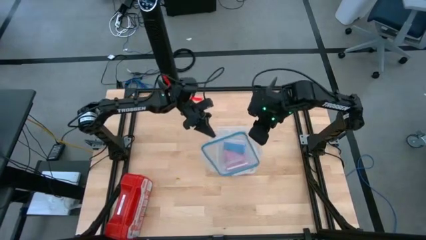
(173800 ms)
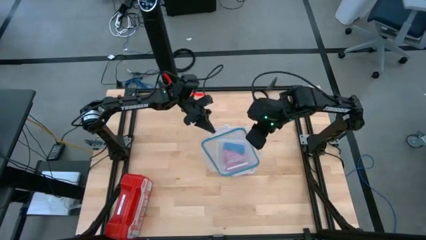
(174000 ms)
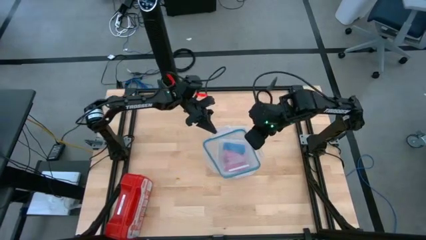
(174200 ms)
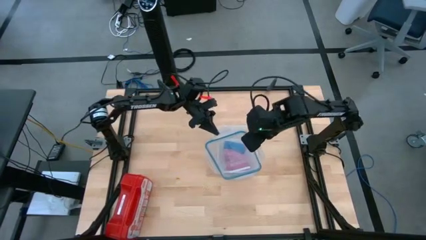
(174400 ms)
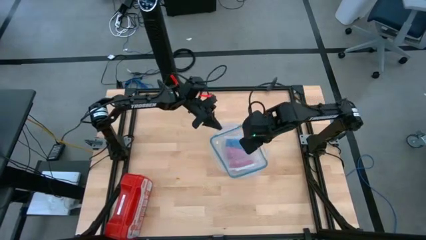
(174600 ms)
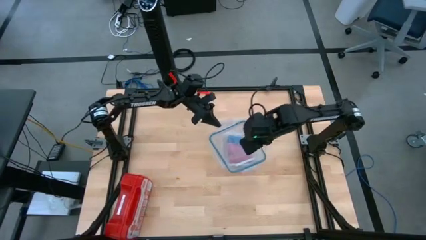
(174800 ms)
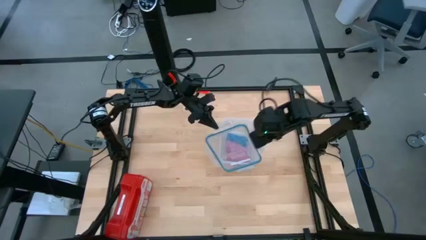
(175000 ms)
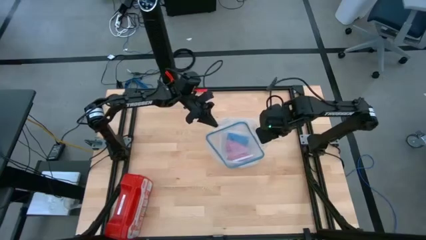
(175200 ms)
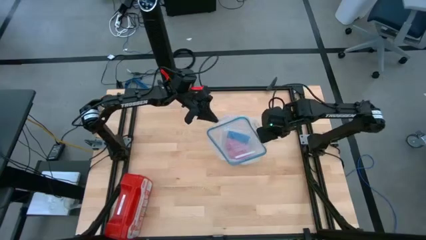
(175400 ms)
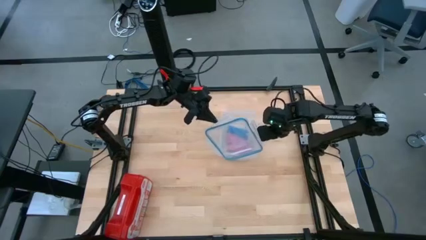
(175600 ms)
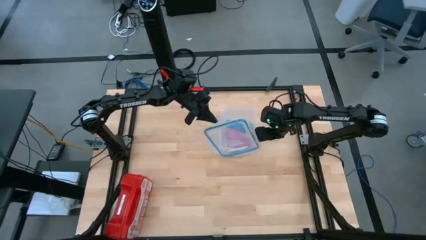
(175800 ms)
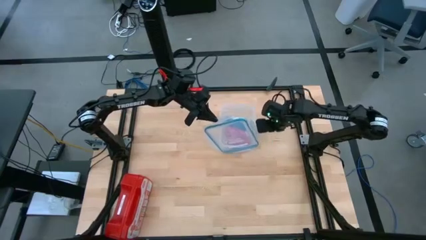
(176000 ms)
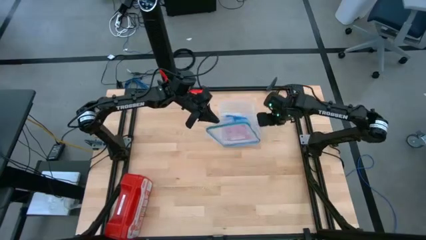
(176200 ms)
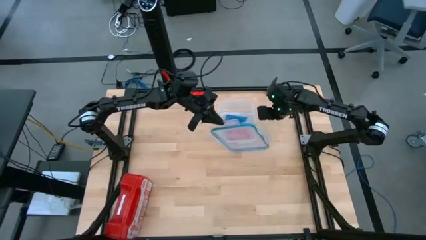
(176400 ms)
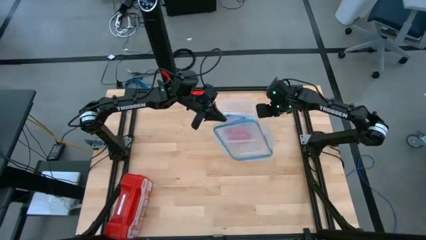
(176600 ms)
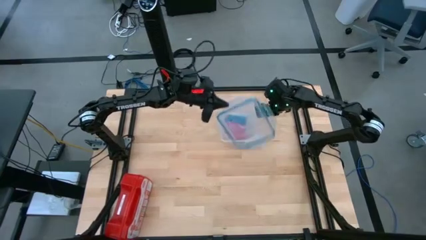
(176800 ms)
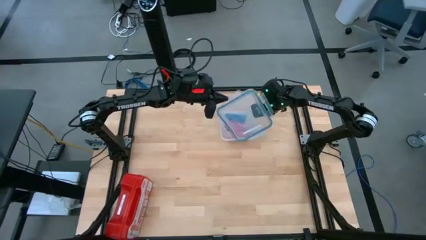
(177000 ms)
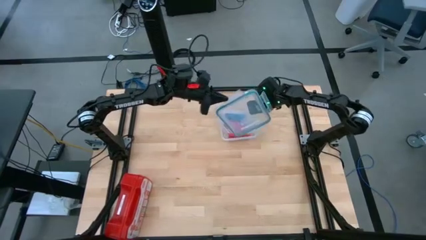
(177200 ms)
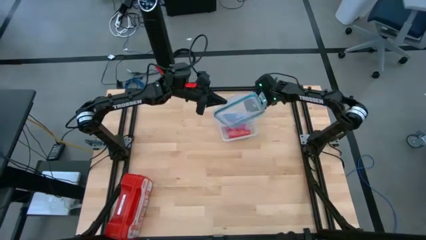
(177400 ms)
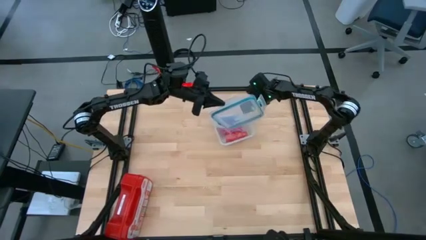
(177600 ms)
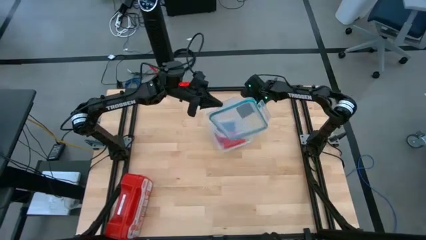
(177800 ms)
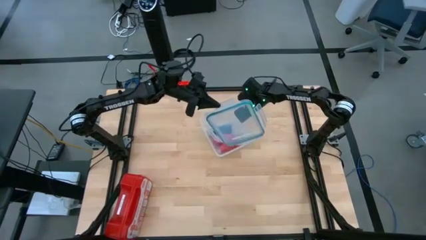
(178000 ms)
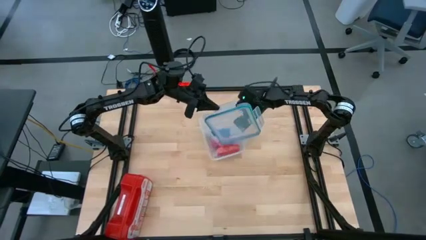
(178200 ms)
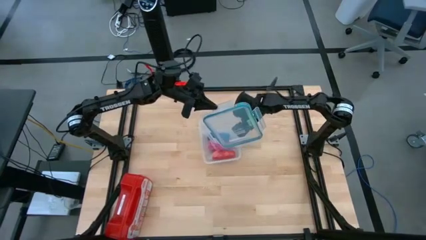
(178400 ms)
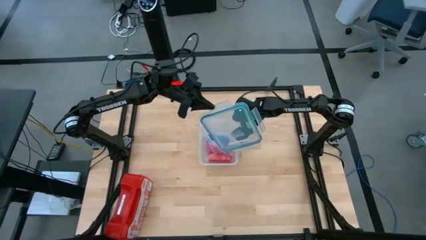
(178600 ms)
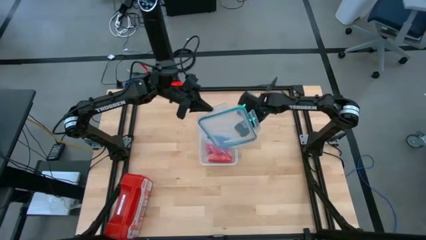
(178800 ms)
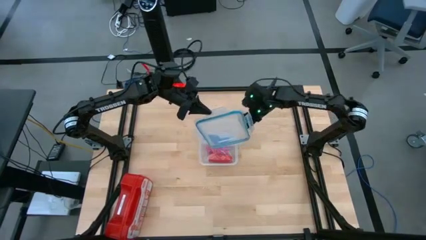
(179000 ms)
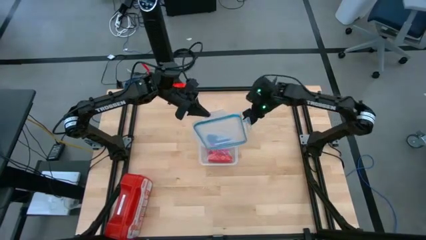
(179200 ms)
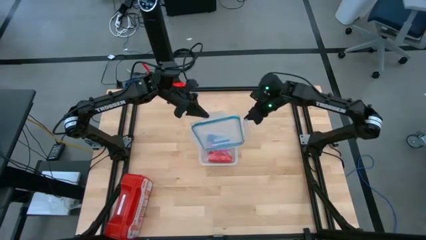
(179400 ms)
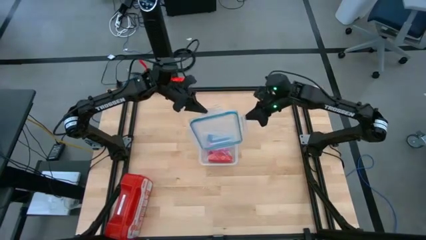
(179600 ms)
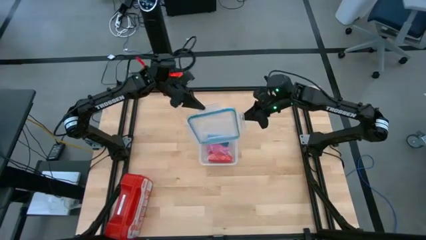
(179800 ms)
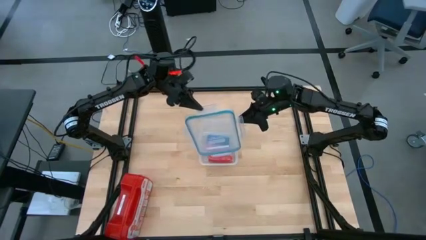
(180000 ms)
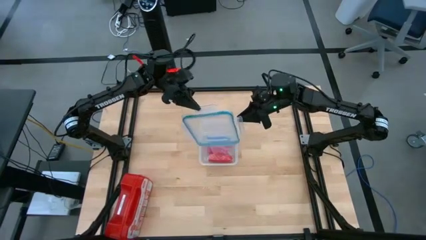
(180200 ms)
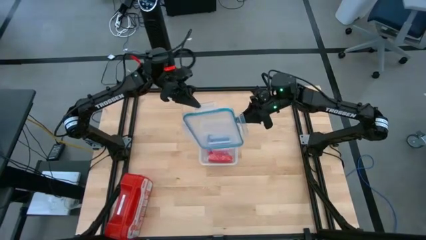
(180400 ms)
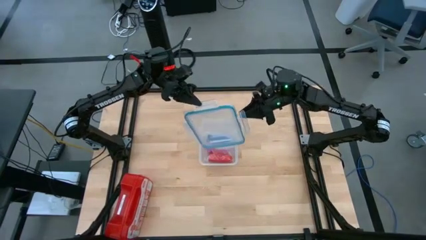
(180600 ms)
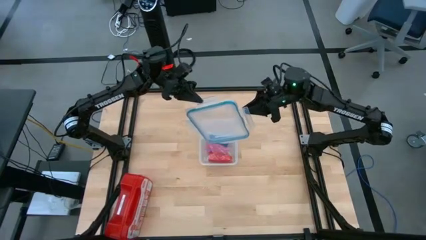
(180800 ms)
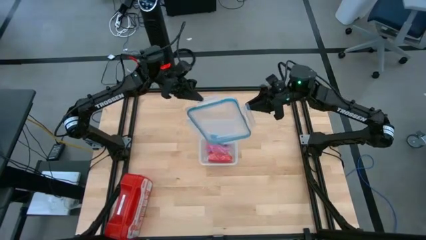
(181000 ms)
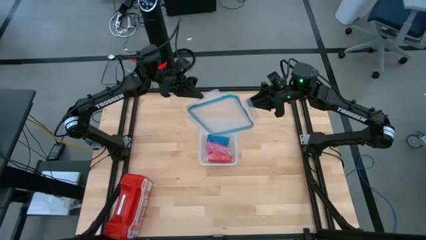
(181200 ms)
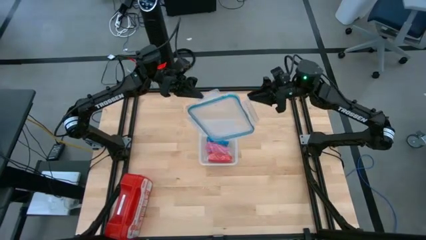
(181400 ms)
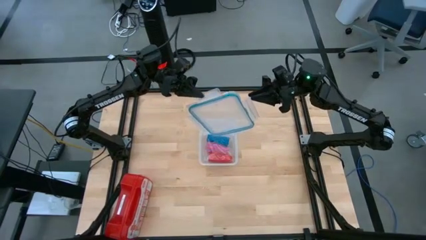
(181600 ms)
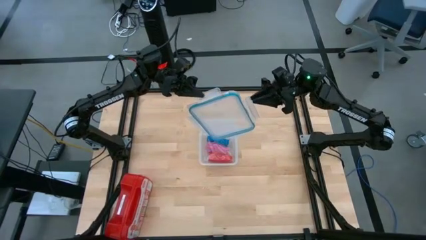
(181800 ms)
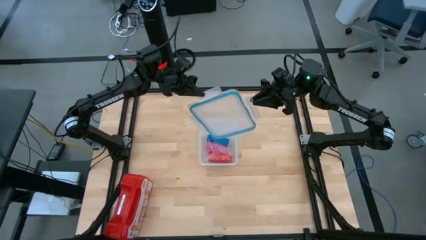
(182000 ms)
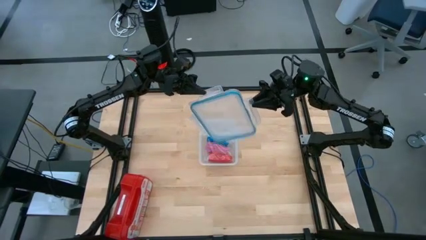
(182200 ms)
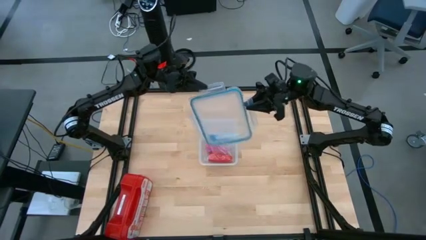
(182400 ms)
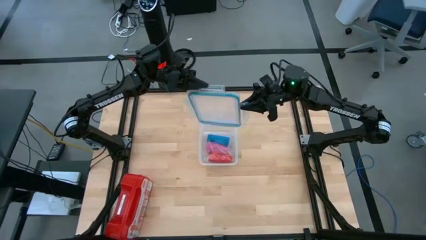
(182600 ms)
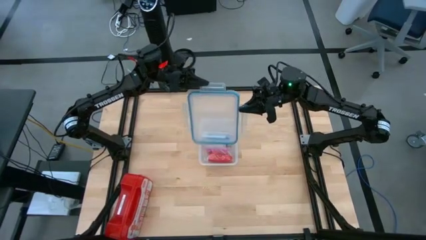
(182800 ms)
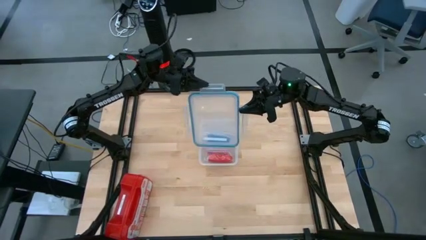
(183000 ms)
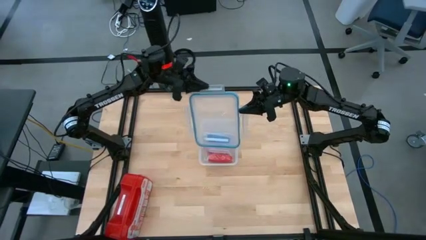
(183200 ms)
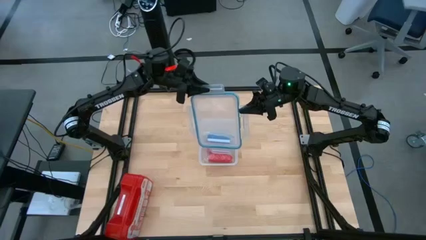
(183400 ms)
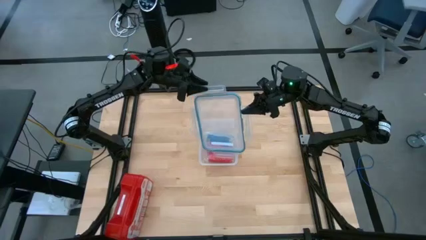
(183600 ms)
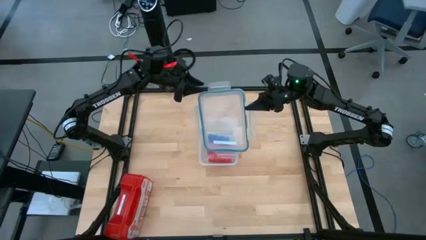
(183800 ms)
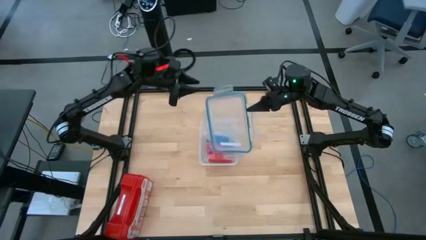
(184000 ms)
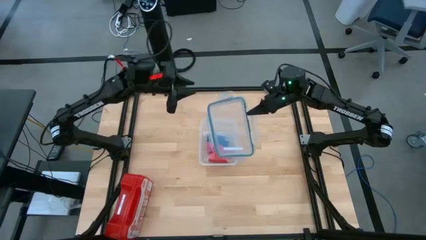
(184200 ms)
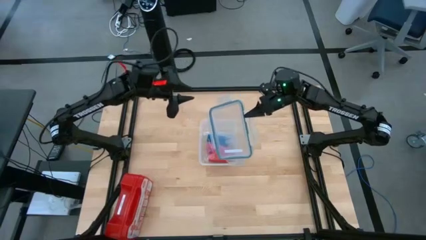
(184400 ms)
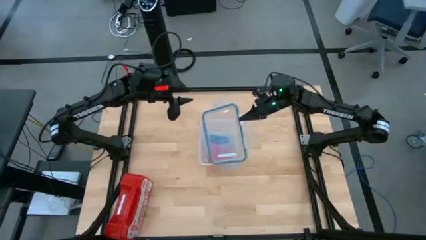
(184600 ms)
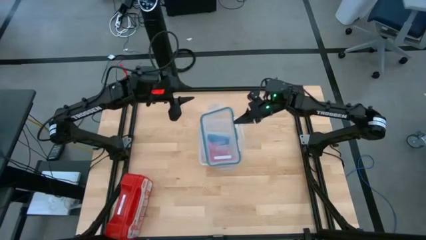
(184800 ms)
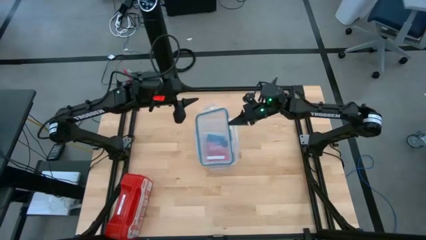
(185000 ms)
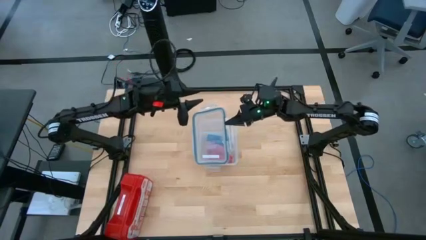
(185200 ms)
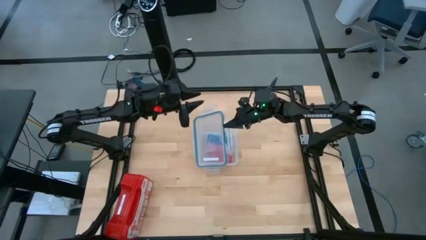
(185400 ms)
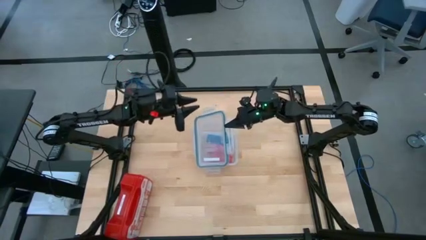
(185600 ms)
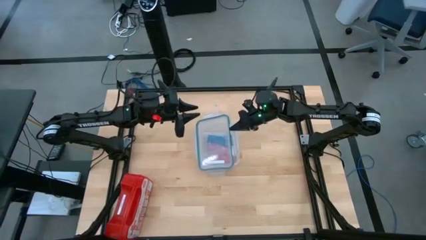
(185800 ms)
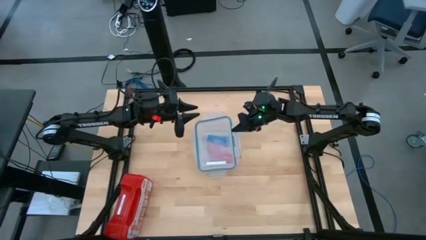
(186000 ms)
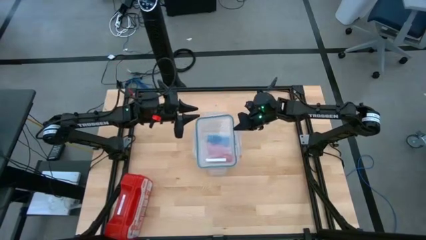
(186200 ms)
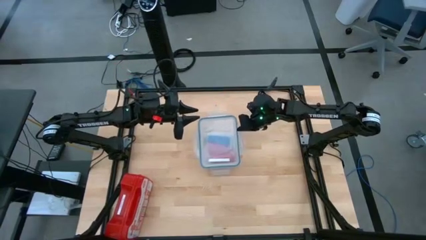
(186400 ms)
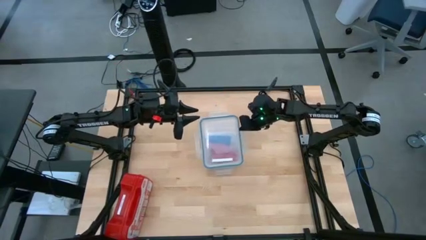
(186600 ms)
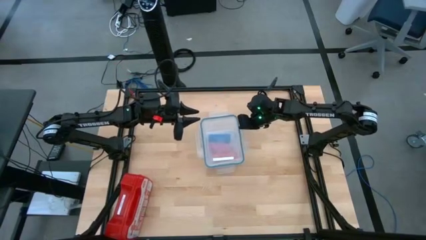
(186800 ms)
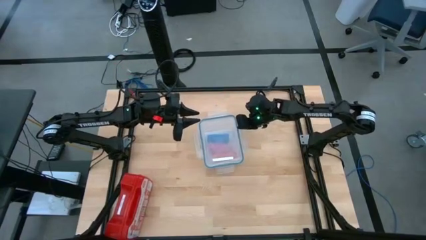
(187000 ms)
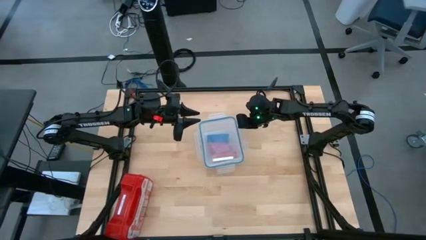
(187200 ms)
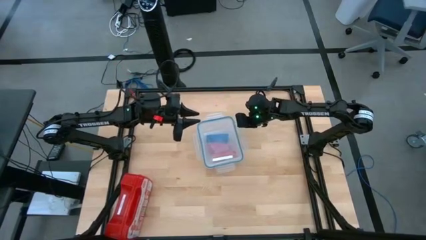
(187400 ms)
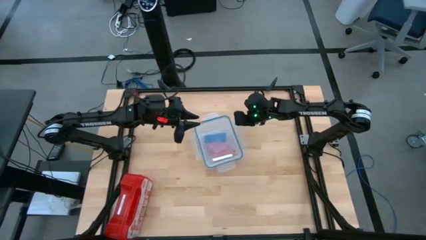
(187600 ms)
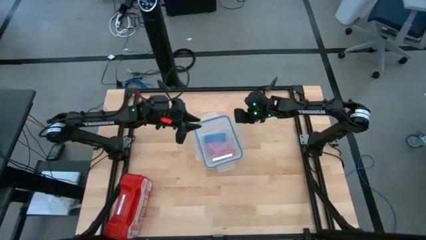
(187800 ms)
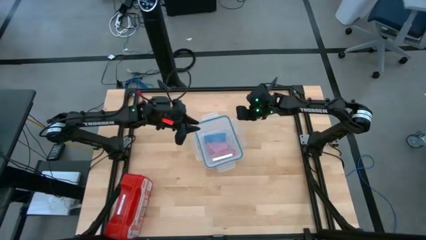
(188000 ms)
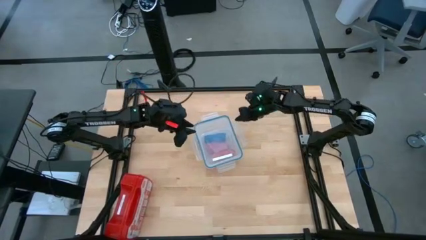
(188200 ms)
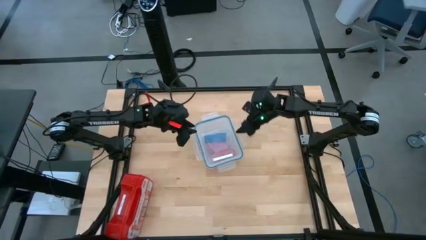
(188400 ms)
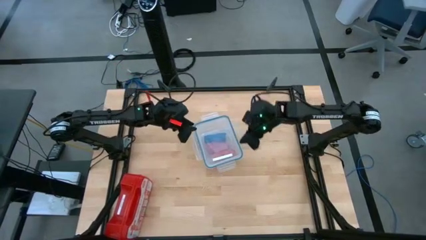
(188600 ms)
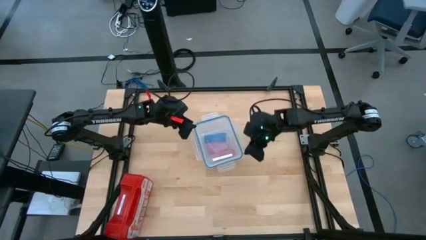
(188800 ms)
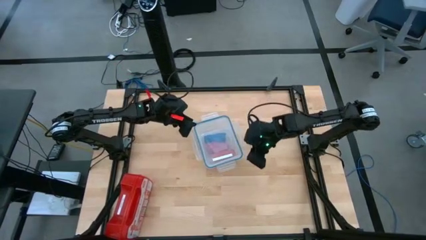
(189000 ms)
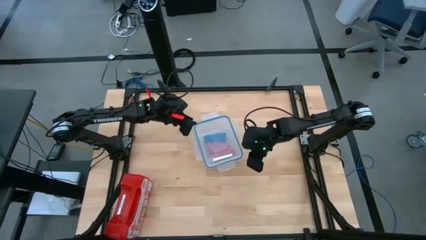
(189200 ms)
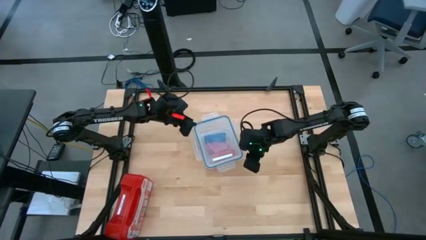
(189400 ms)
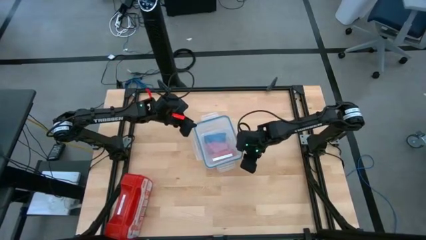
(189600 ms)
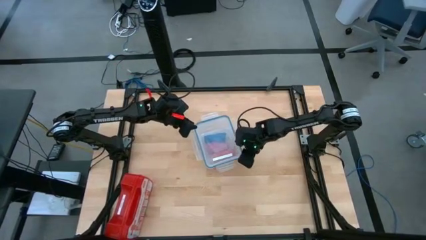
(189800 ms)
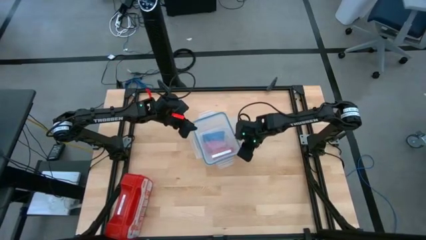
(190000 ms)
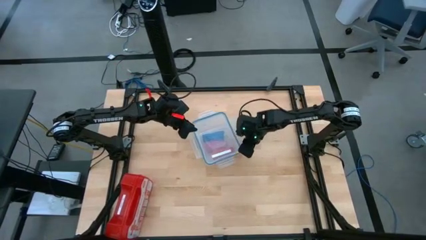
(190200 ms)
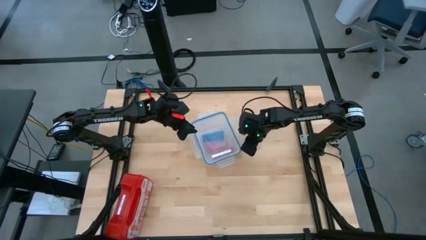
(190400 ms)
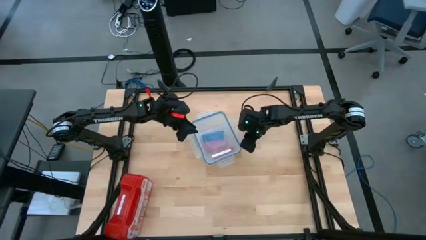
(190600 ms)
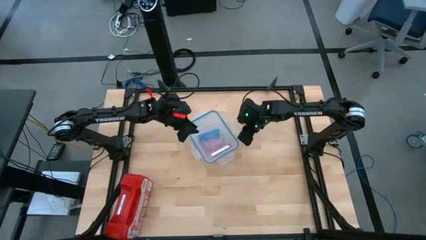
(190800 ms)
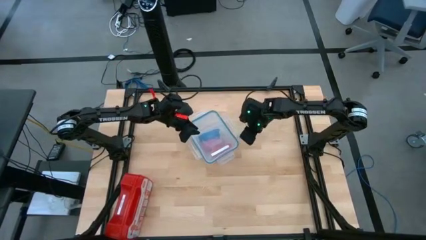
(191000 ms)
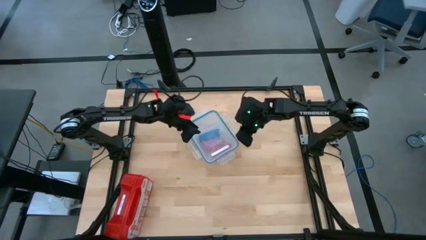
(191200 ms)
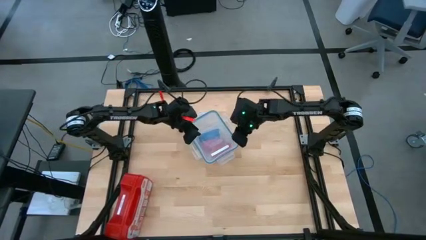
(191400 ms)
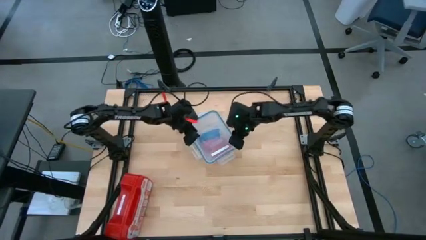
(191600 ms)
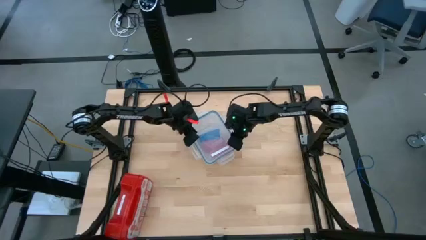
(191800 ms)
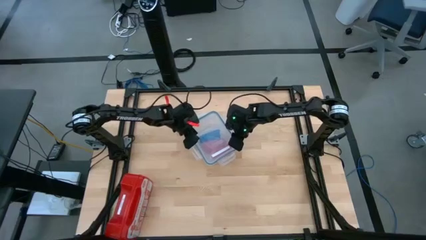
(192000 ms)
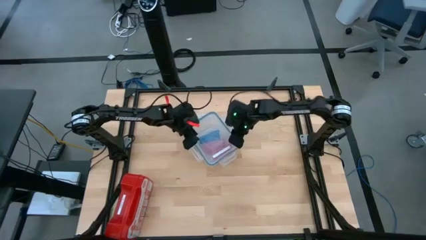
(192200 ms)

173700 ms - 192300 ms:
Task: Roll bandage
Close the lid of the tupperware
